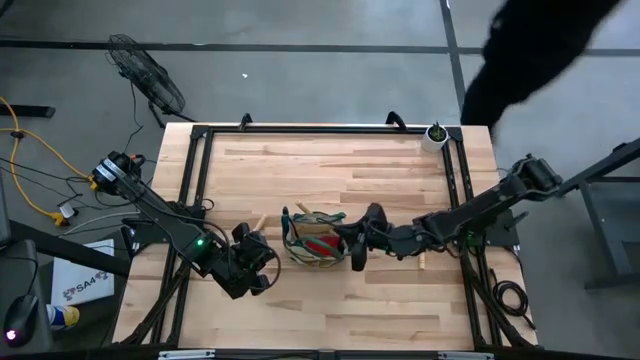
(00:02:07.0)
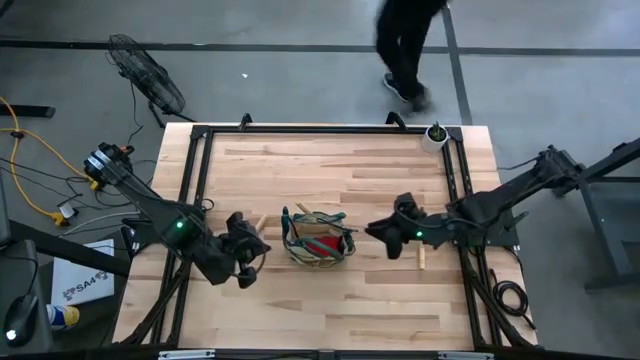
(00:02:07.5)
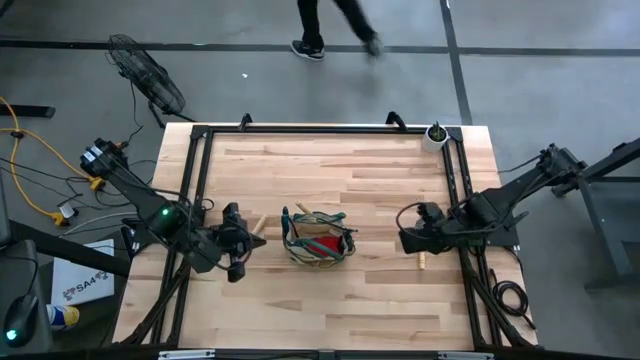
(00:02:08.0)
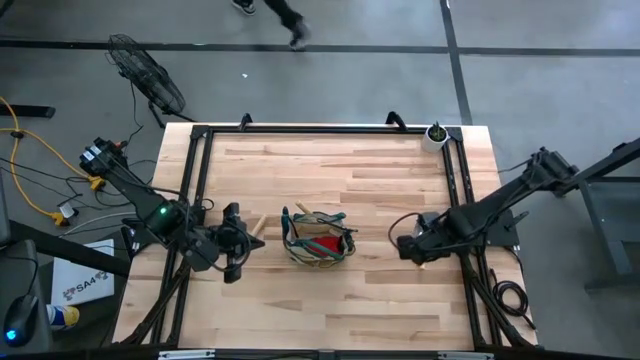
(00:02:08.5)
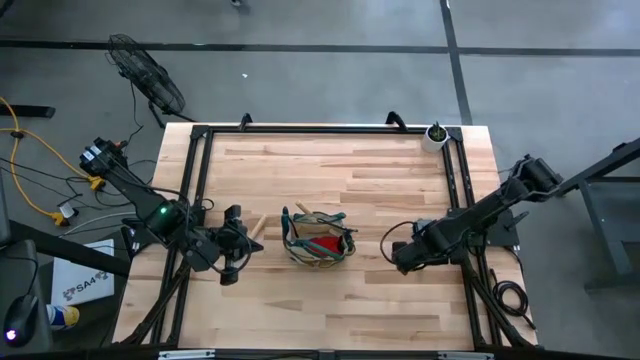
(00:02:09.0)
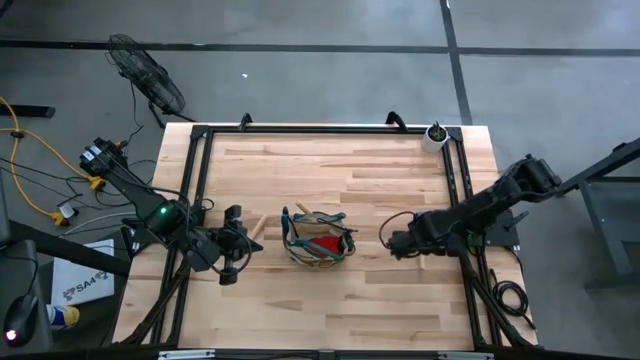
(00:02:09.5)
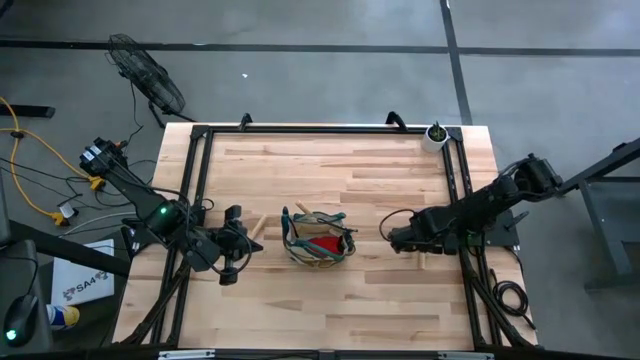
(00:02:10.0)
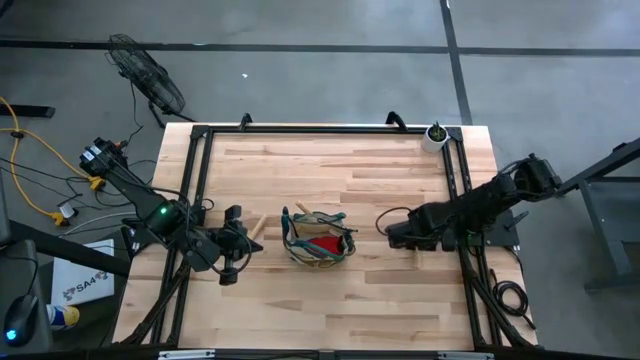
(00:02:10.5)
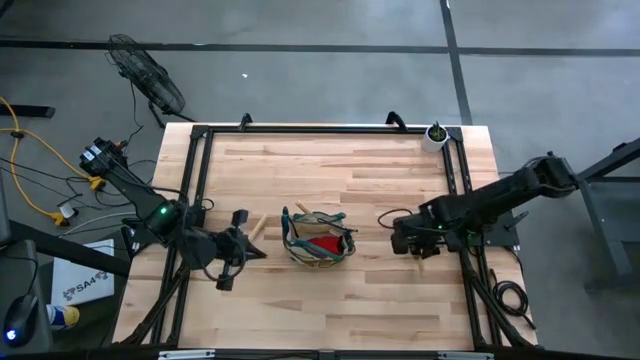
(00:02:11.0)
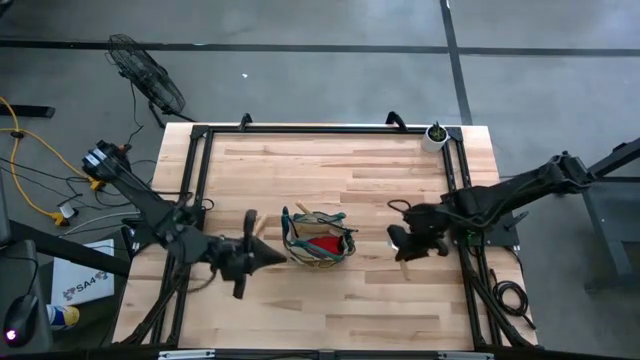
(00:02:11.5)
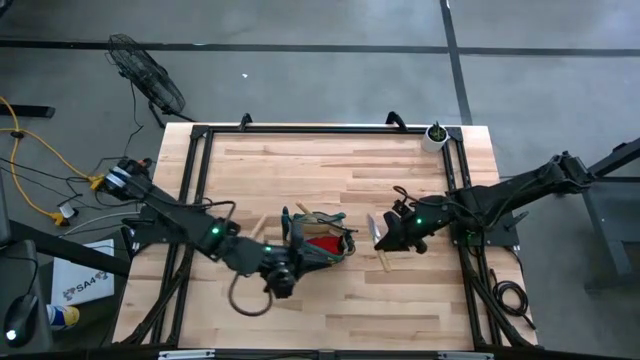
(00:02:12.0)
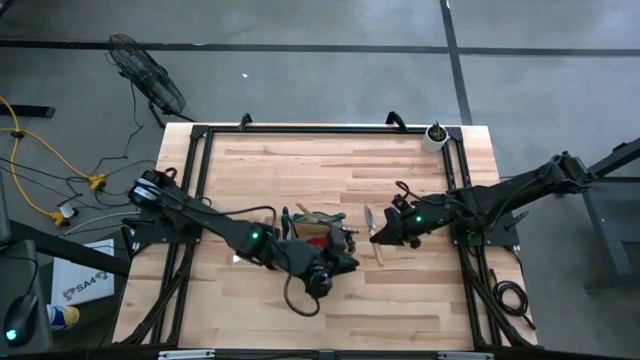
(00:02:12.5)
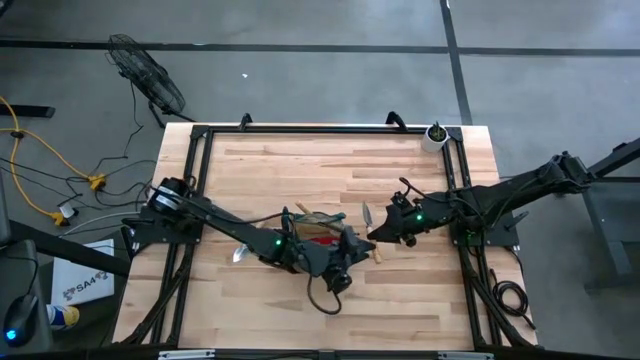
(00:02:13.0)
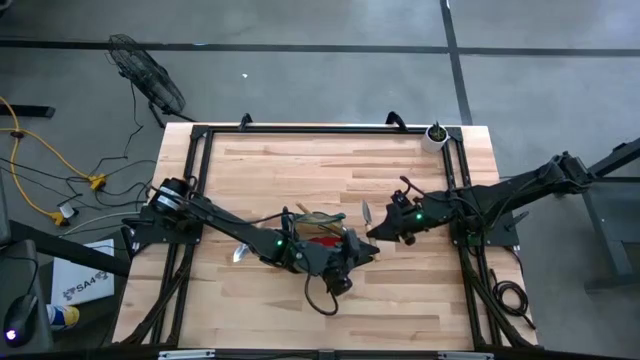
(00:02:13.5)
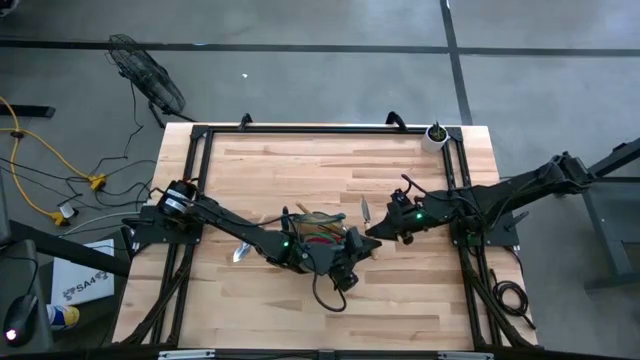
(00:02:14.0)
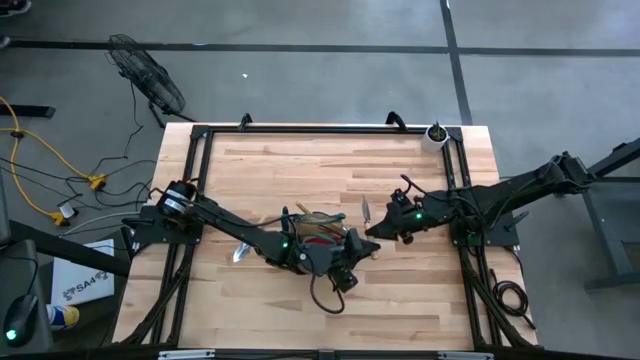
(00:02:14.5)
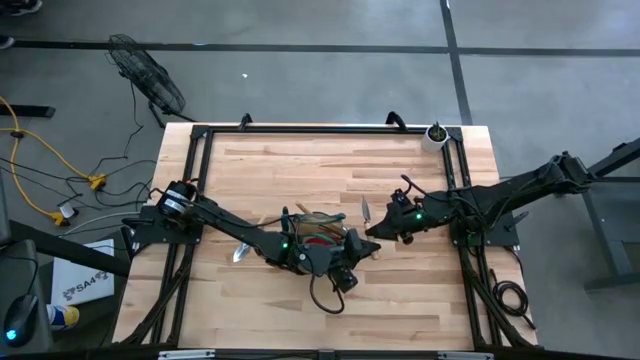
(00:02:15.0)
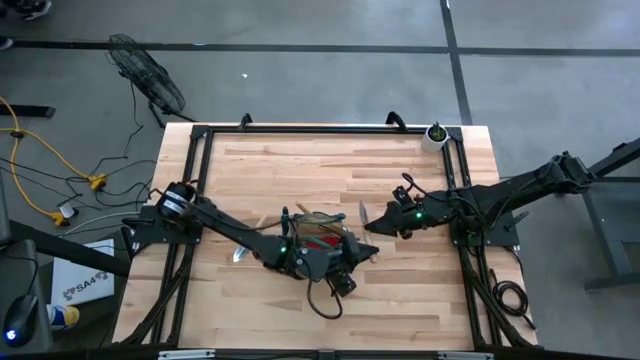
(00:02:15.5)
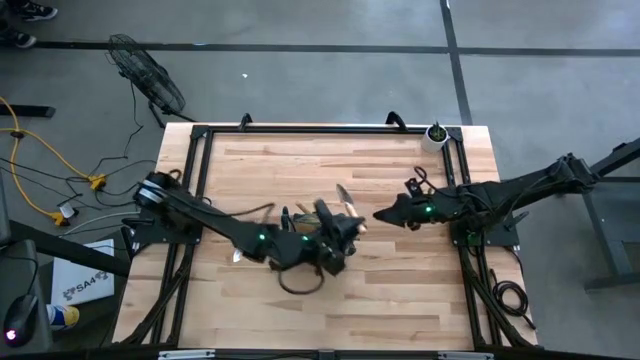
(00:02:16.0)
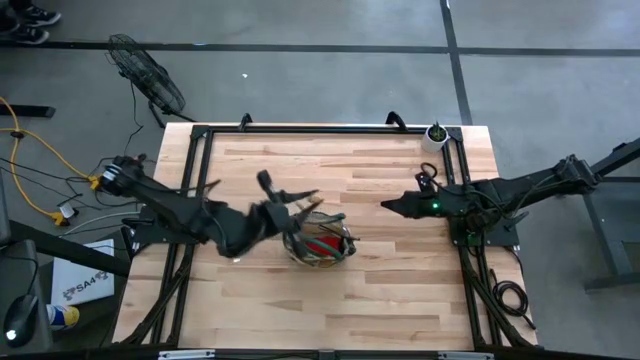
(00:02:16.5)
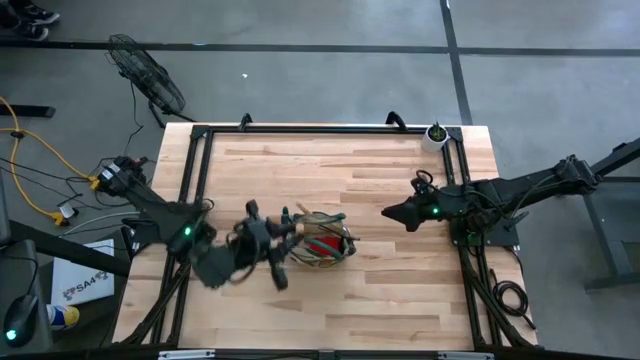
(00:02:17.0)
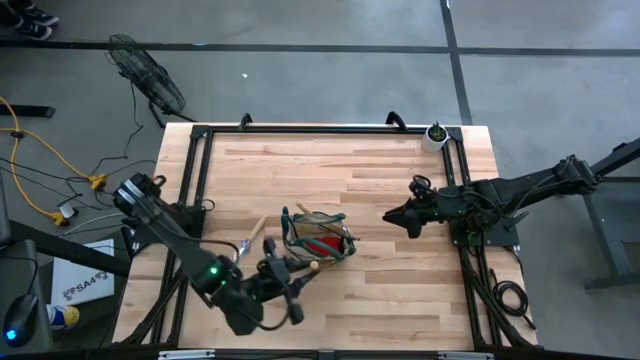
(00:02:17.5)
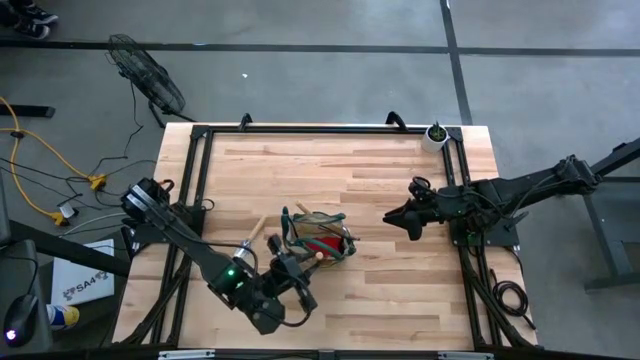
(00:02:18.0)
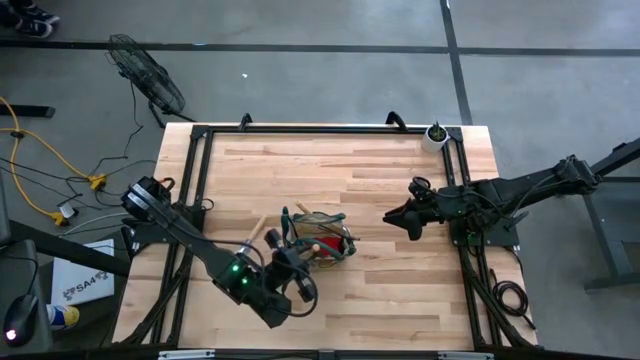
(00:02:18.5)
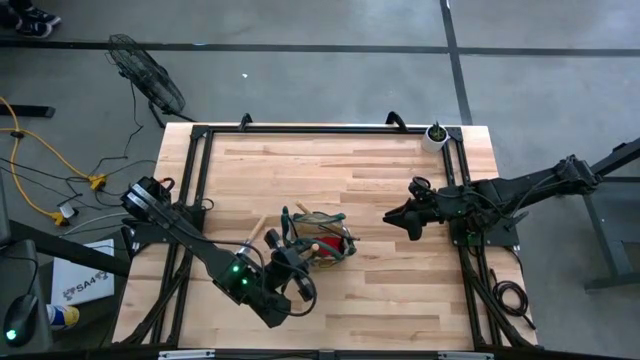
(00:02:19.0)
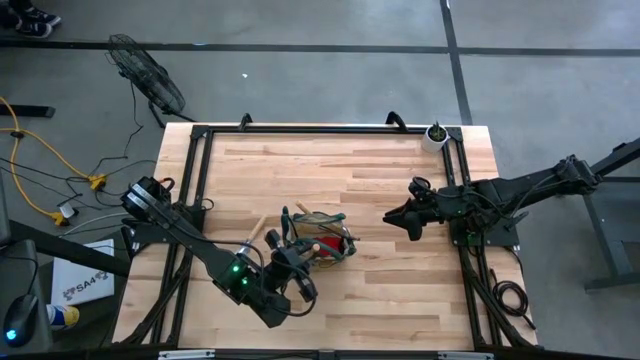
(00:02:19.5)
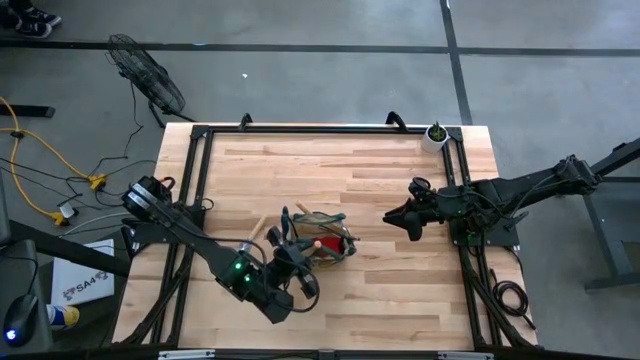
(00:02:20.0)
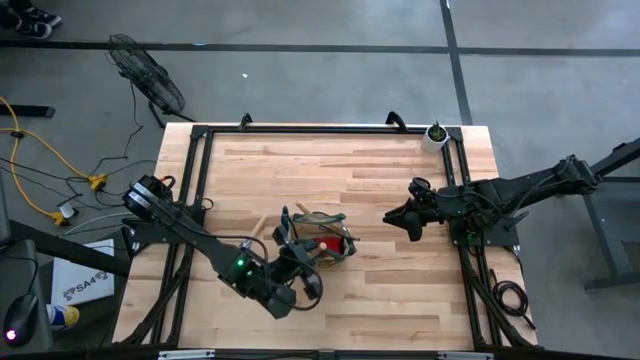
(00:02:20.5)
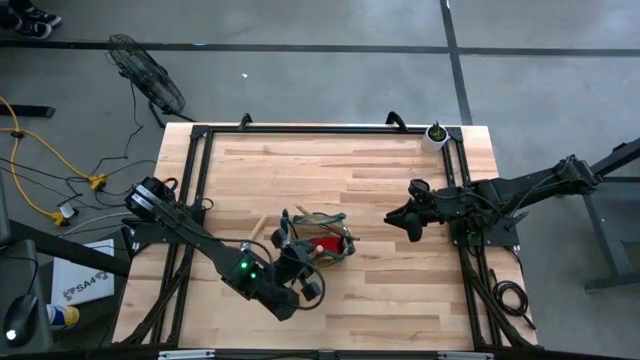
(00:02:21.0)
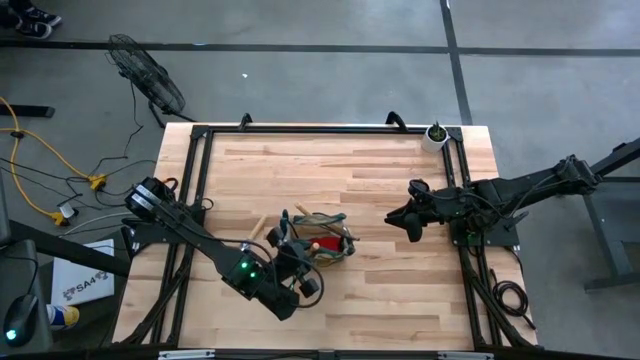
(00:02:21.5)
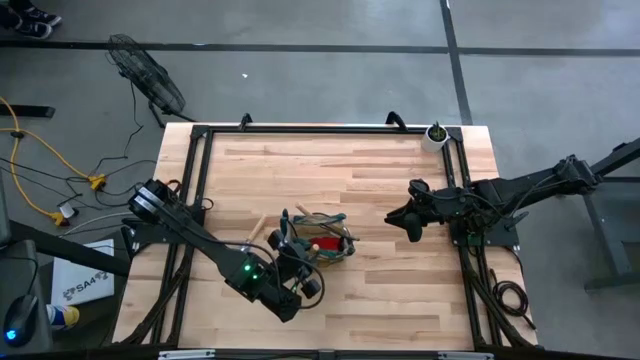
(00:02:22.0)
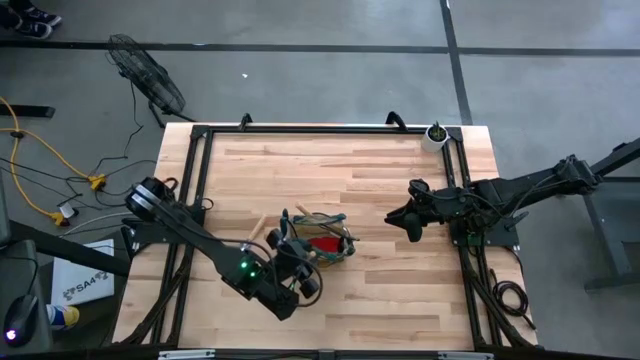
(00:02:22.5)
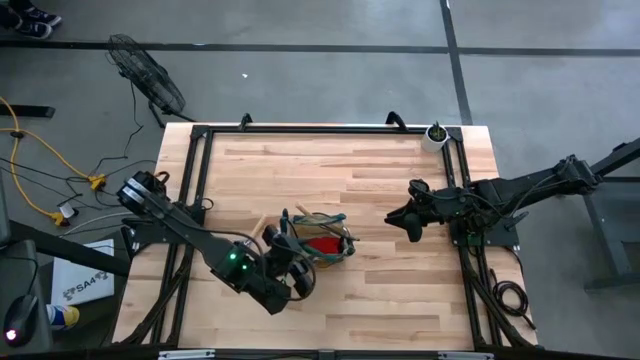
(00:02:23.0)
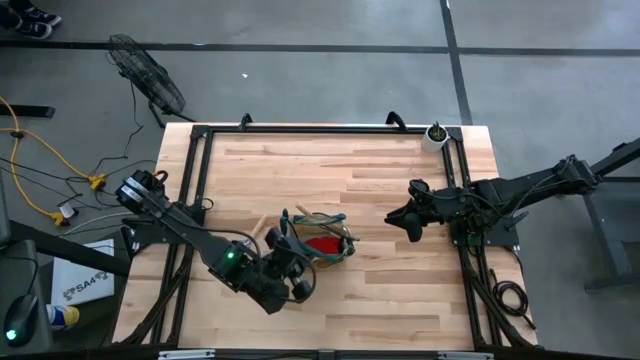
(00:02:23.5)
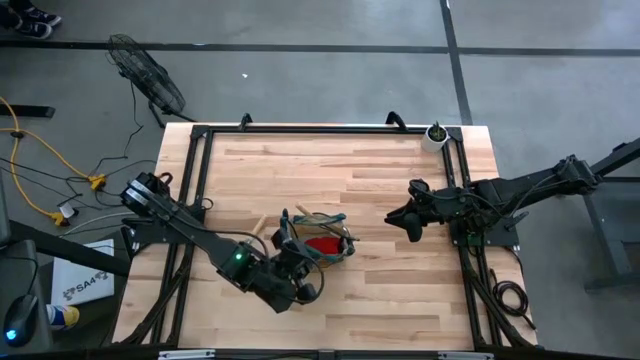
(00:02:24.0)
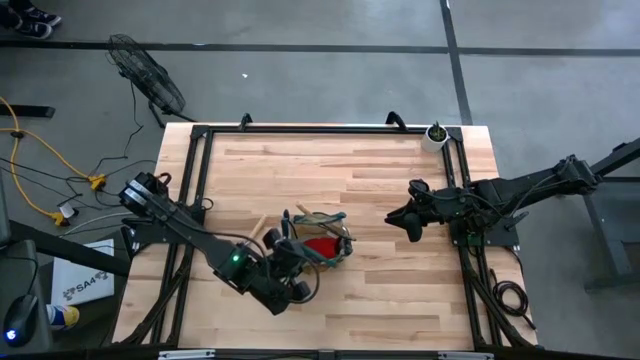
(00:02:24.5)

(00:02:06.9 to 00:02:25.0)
Task: Pick & Place Garden tools in Gardening bag
Put the right light brown trowel into the light brown gardening bag

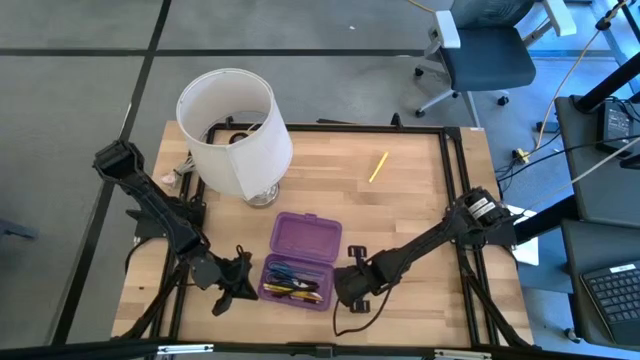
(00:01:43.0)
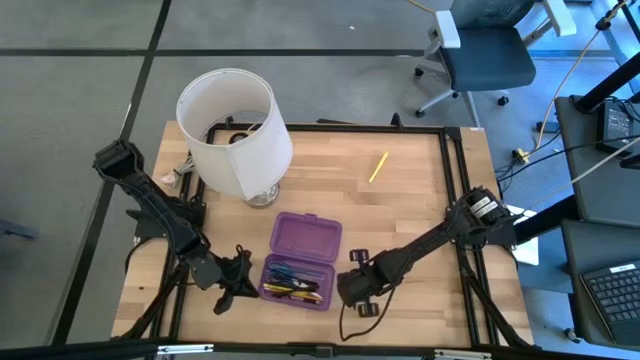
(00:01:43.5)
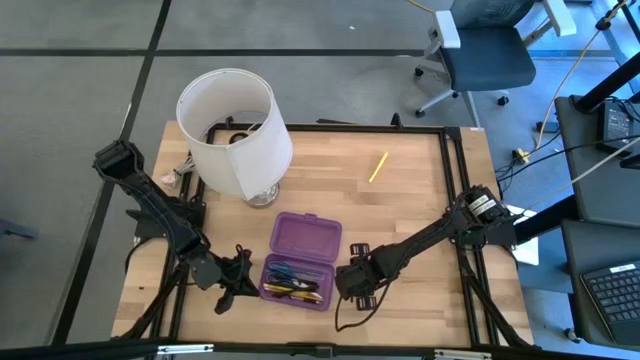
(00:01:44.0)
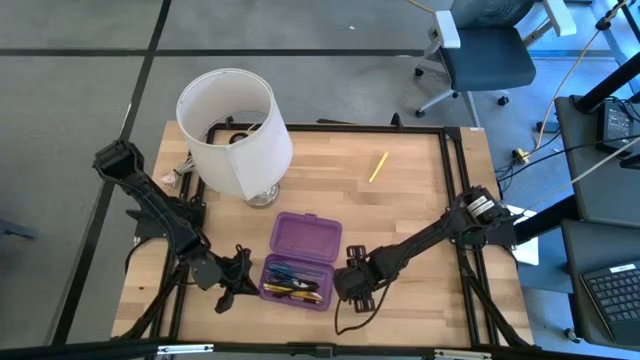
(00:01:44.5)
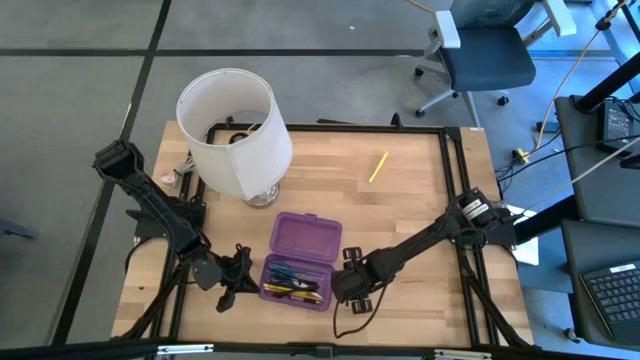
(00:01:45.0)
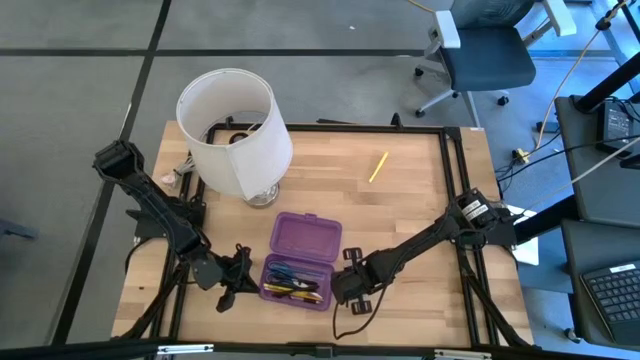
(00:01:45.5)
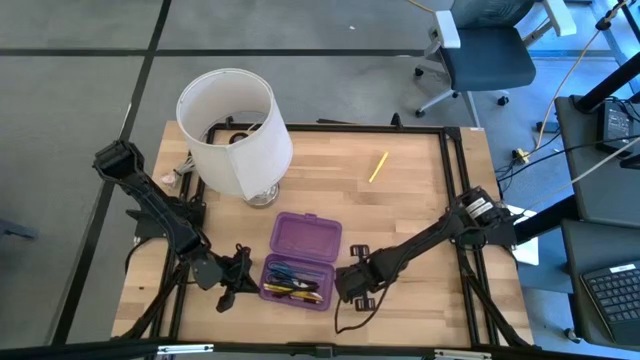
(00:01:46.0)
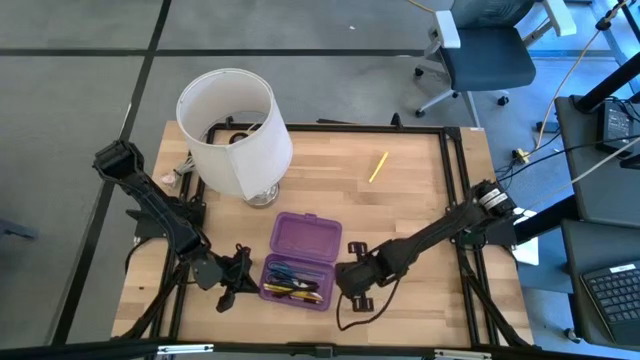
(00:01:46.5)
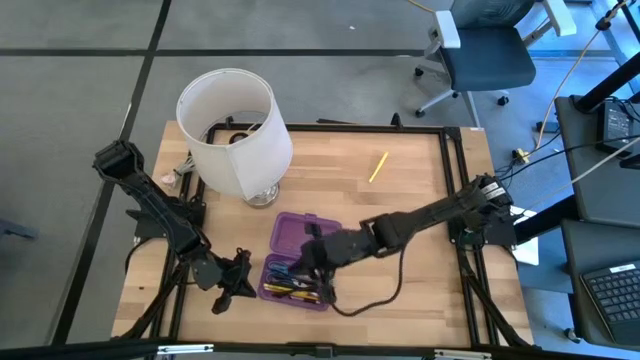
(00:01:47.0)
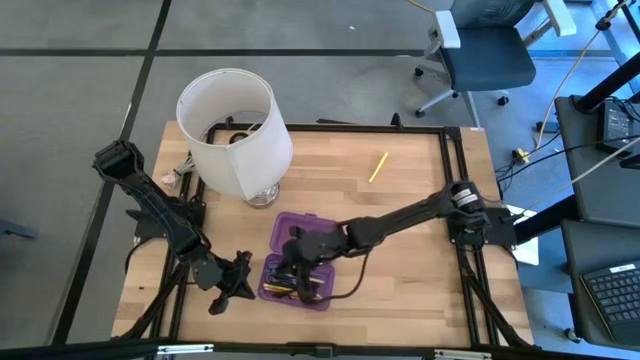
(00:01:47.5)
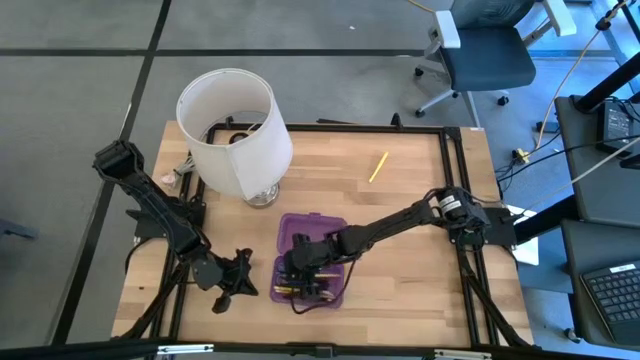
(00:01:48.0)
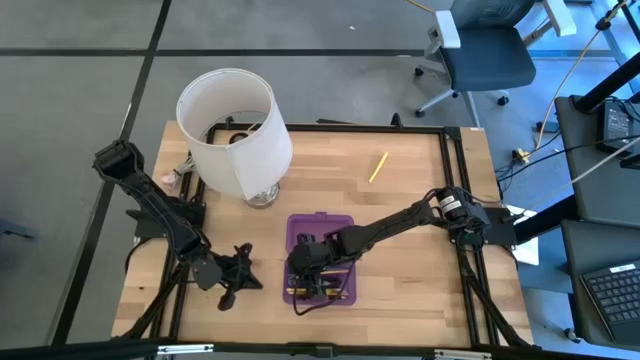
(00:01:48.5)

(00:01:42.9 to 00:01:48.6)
Task: Pick & place school supplies into a supply box
Put the yellow pencil into the purple supply box
